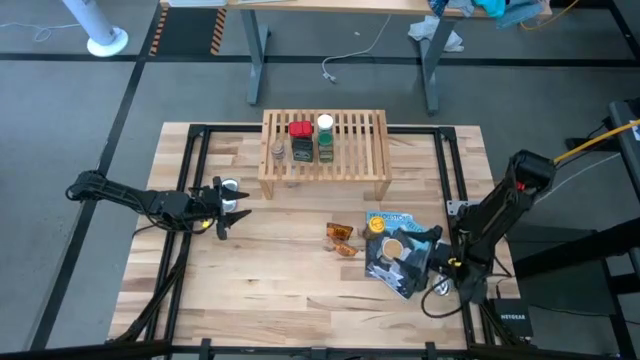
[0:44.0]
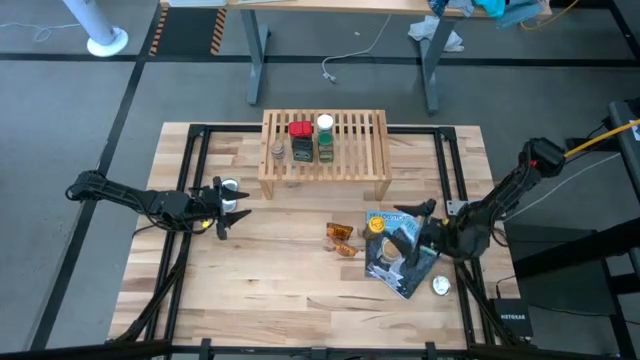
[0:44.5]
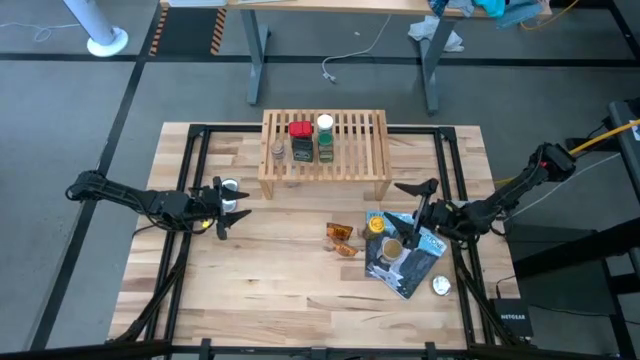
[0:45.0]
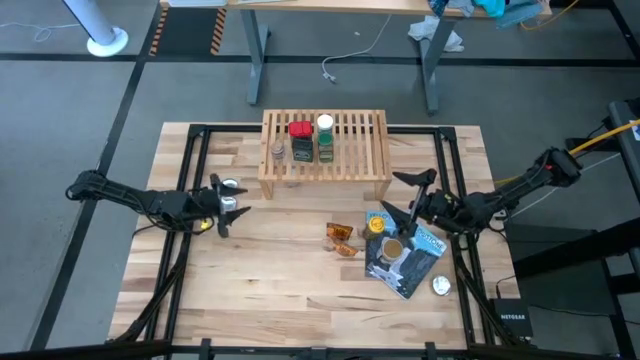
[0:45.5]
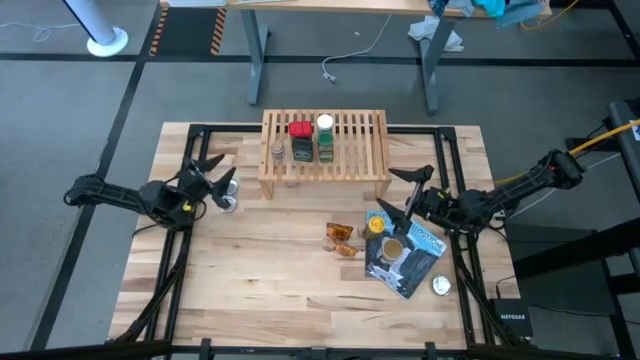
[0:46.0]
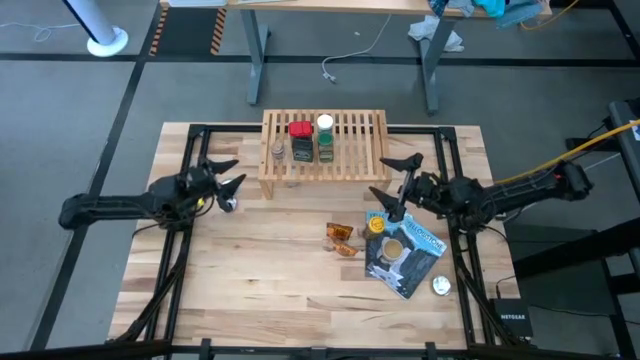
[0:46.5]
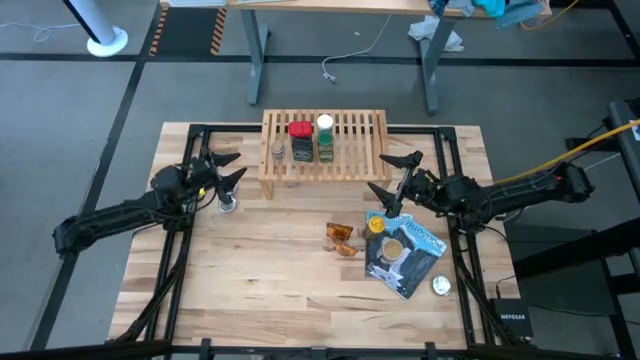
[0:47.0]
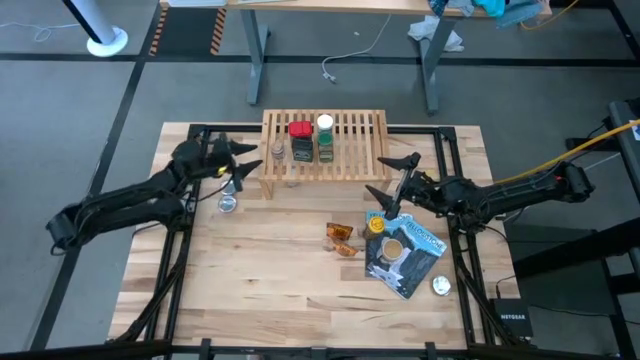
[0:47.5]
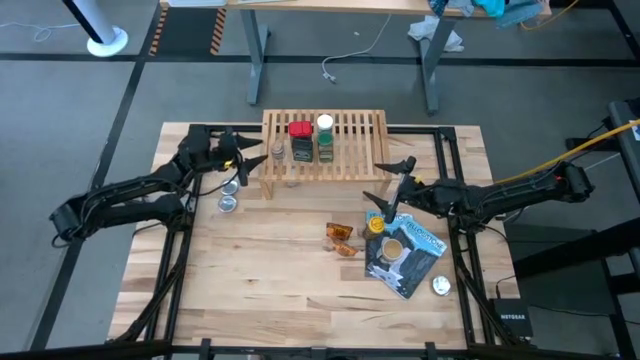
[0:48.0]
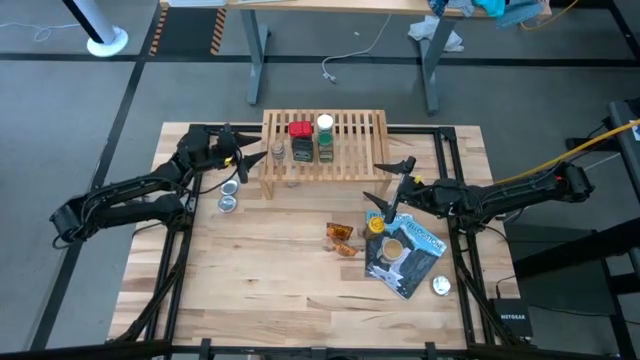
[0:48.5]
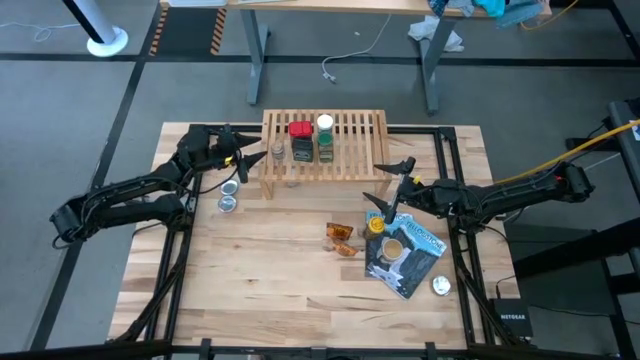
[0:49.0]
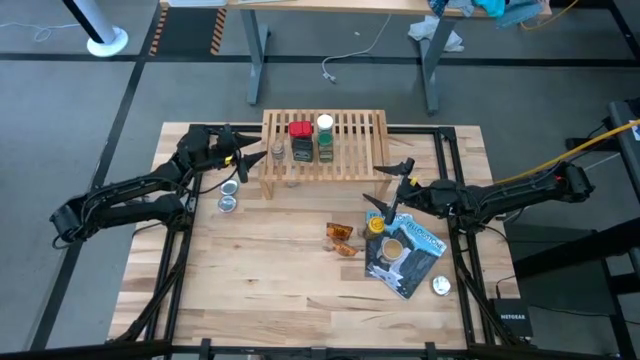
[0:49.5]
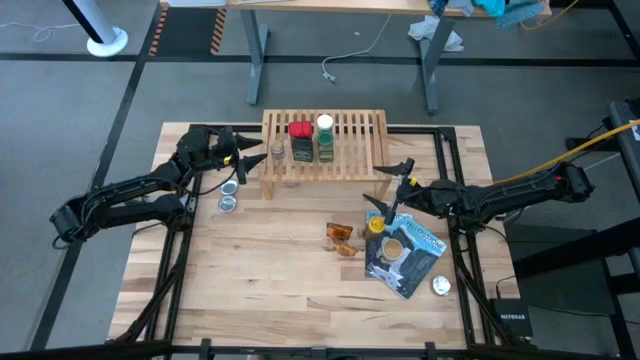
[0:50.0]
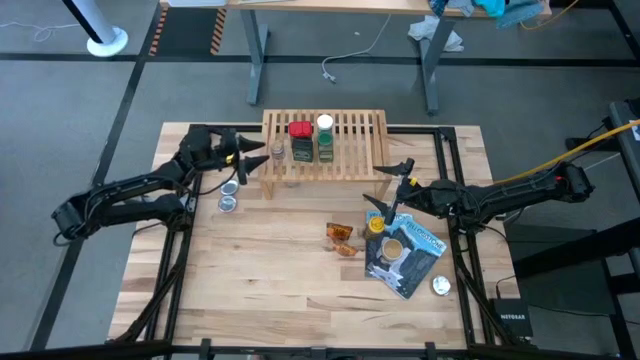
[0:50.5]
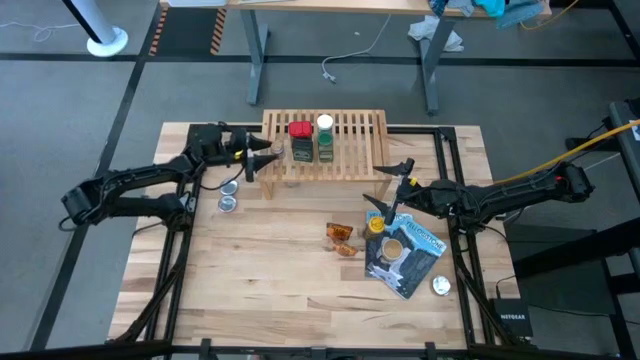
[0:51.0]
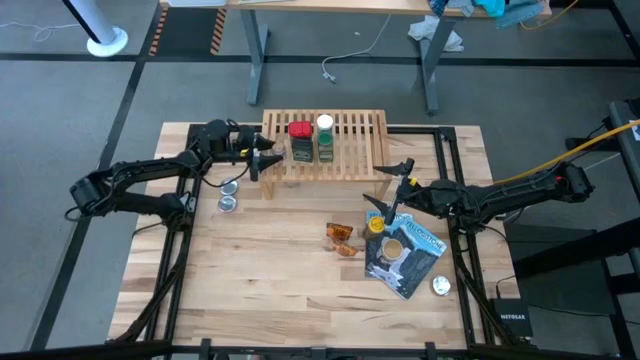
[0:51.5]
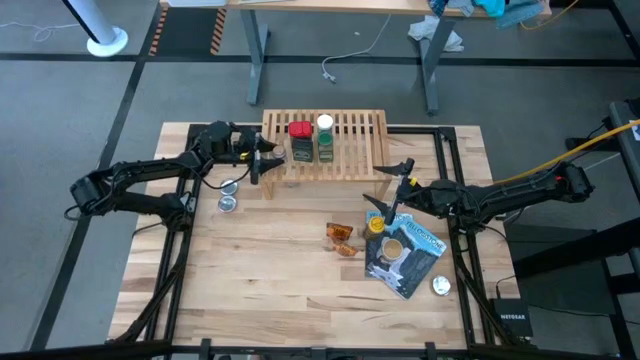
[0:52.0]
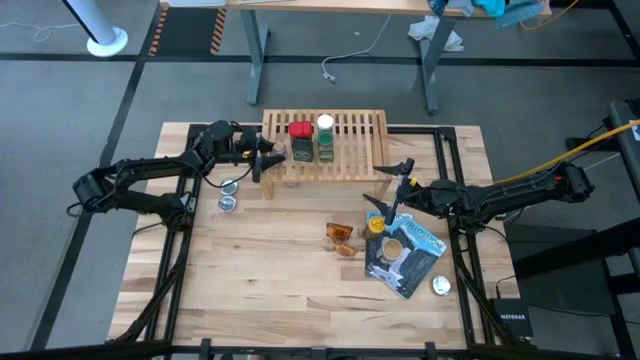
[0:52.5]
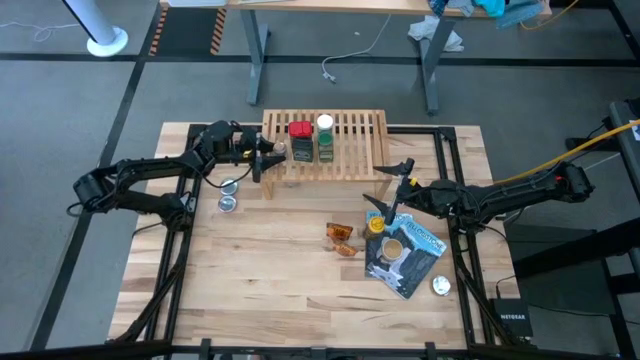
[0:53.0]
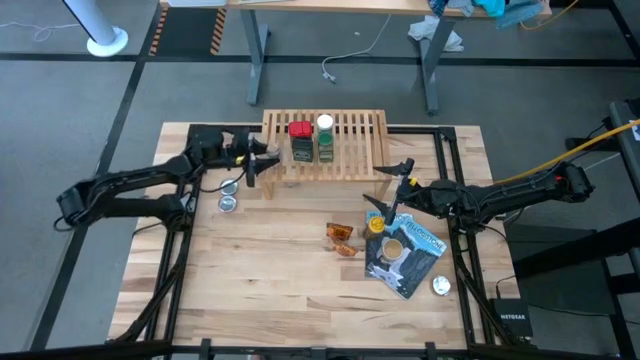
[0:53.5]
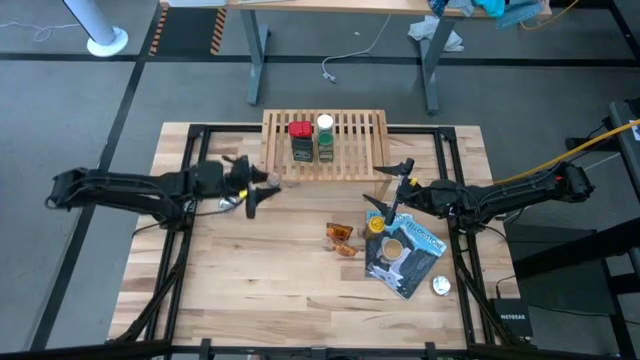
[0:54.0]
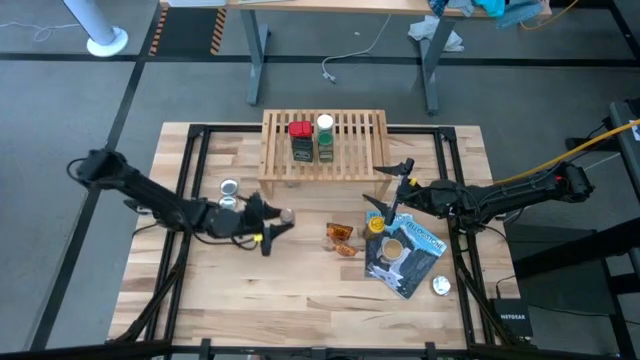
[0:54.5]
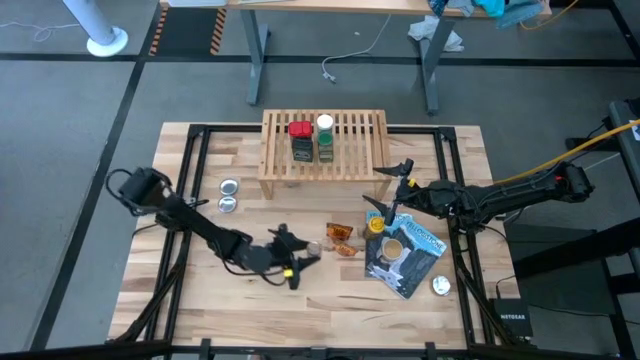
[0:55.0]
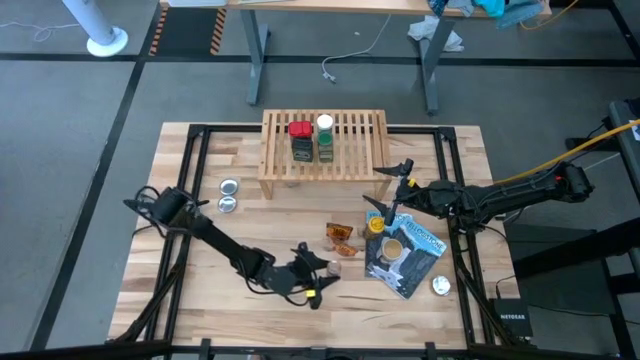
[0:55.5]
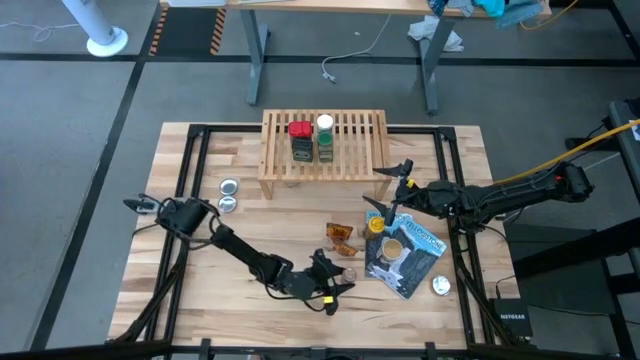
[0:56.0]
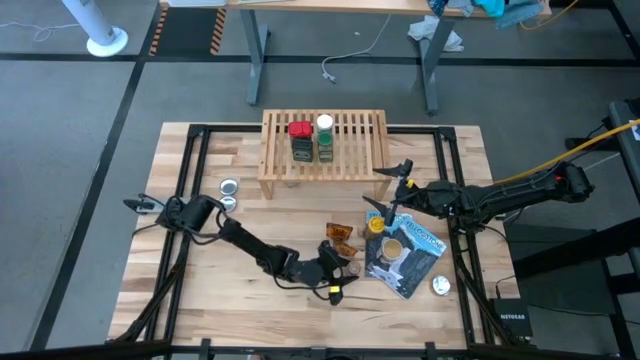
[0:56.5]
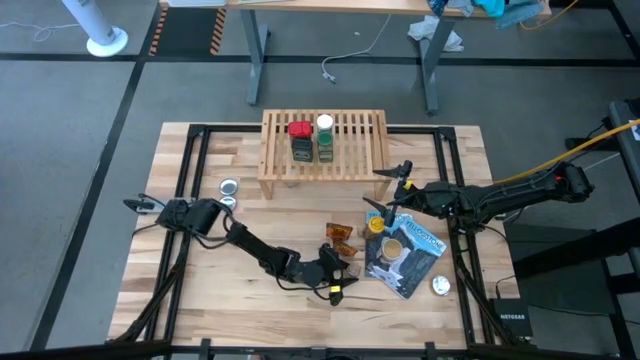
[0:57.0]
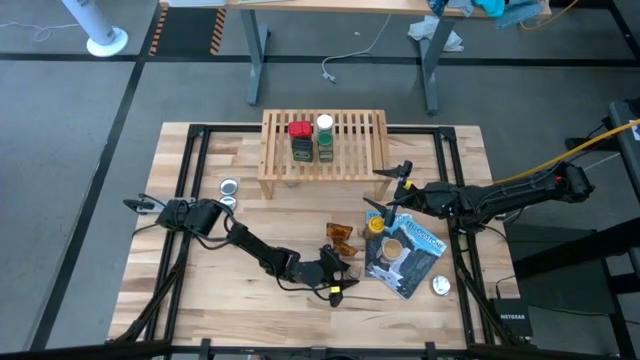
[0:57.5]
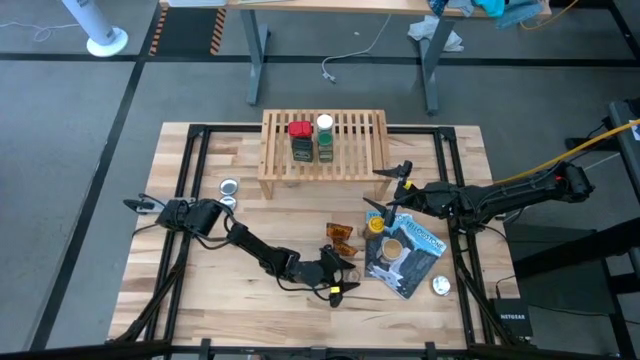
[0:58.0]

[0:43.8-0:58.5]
Task: Shelf spices
Remove the brown seasoning bottle from the shelf

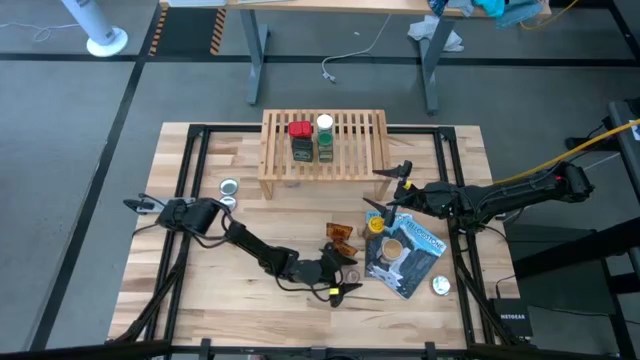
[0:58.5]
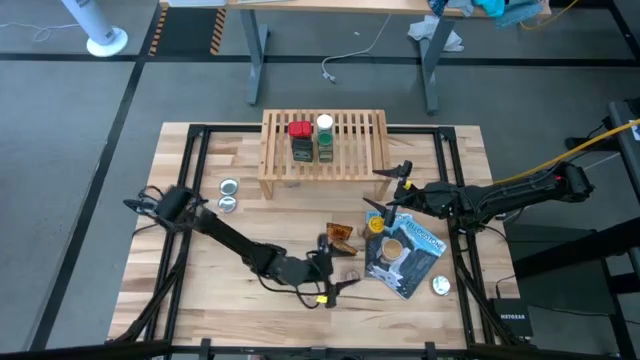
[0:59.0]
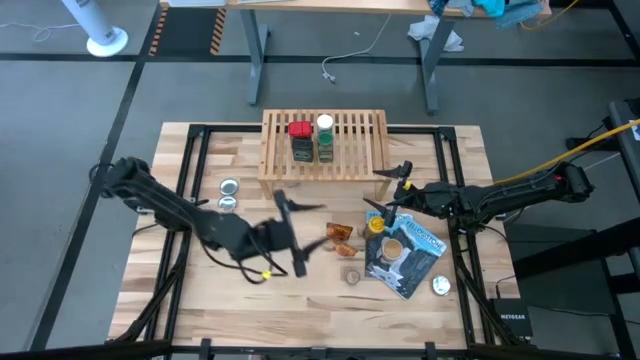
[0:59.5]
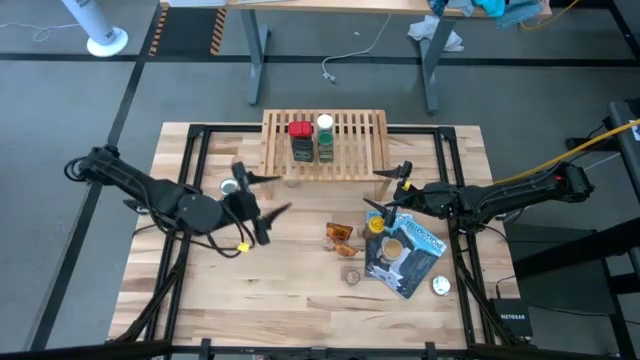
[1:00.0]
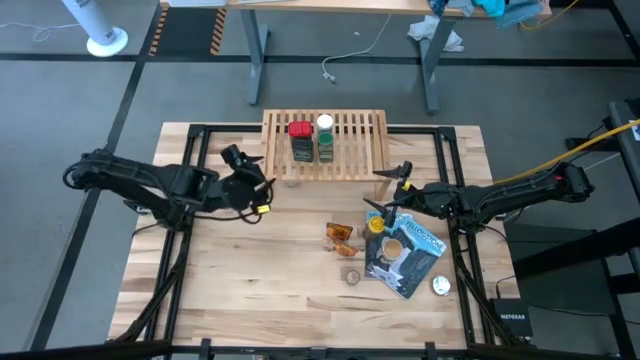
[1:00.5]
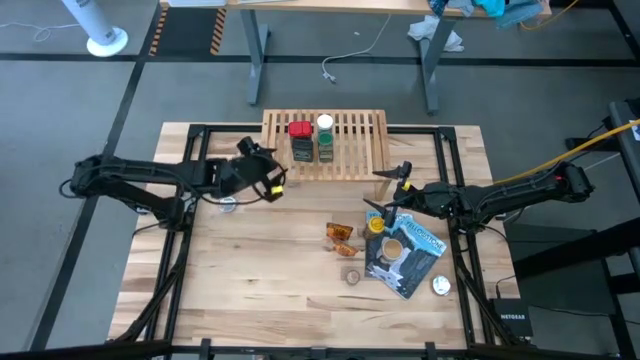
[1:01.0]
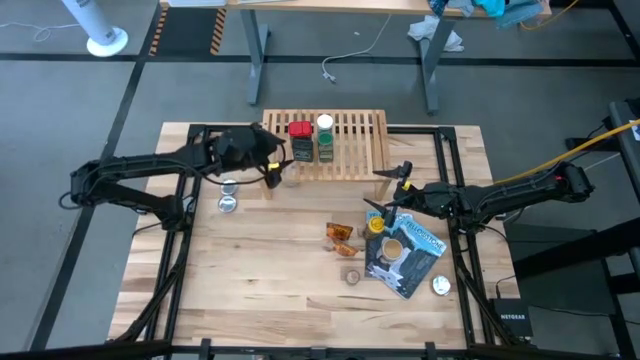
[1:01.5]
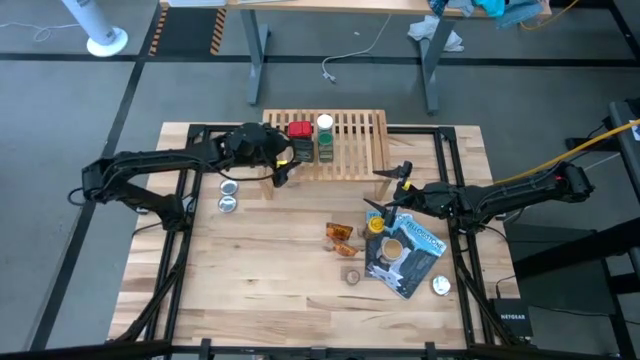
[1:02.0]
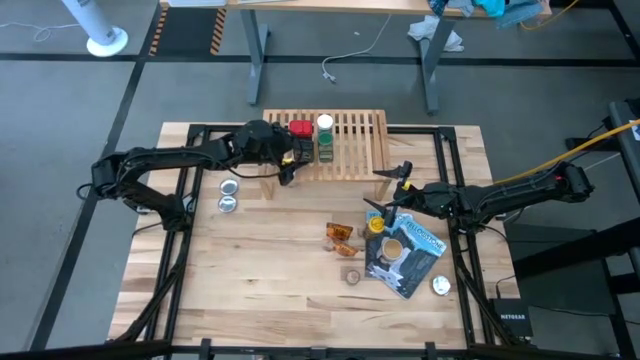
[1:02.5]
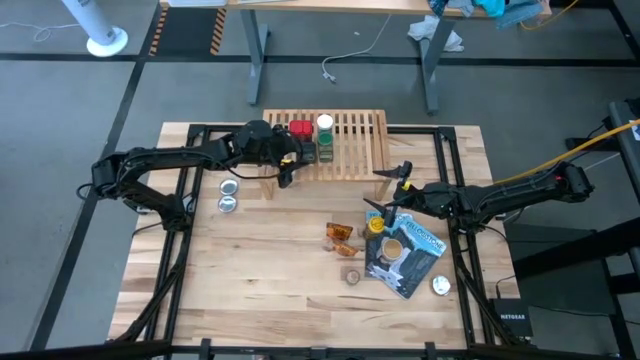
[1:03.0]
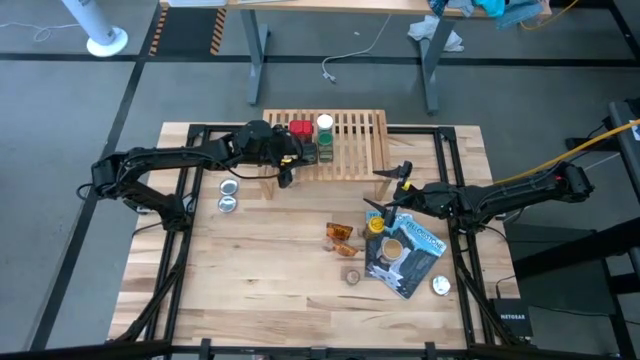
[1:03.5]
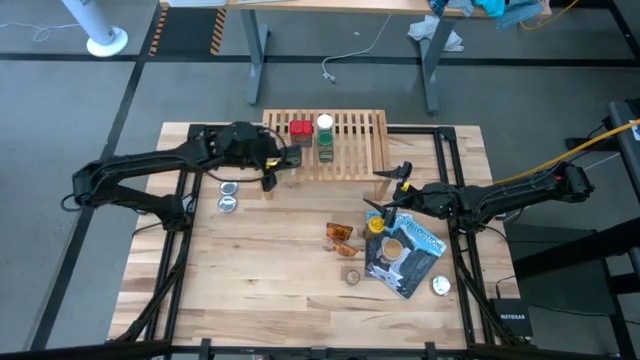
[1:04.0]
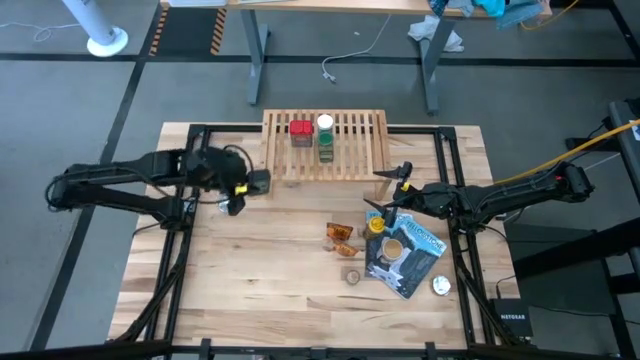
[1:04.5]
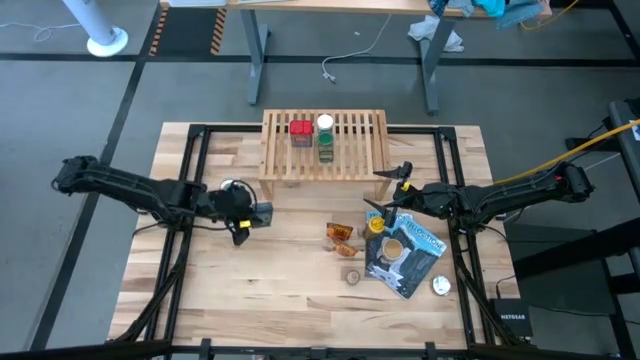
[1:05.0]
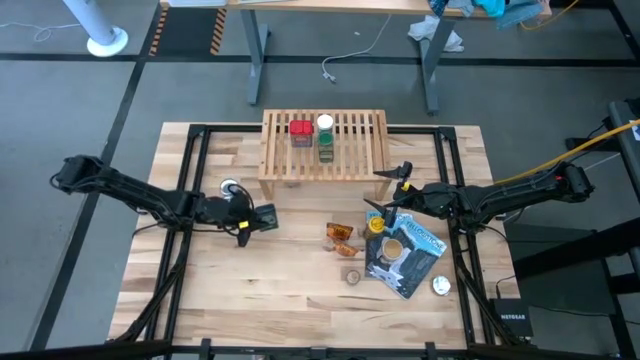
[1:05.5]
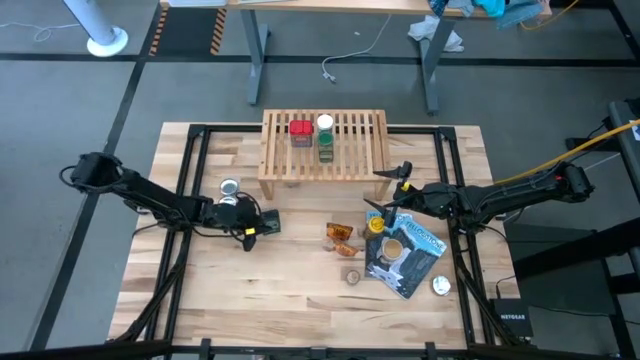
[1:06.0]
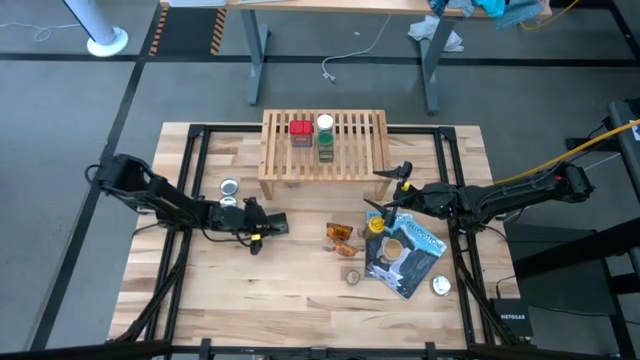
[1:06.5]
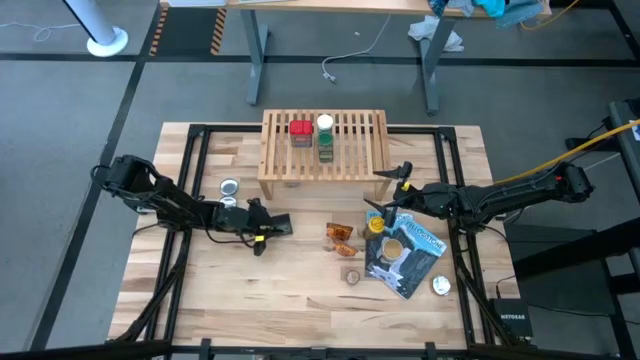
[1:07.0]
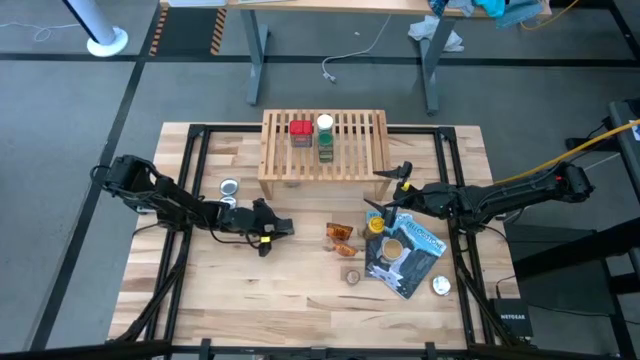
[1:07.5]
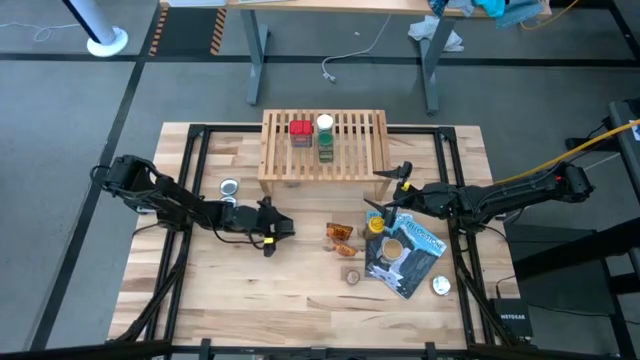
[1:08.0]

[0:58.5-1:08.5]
Remove the black seasoning can from the shelf
